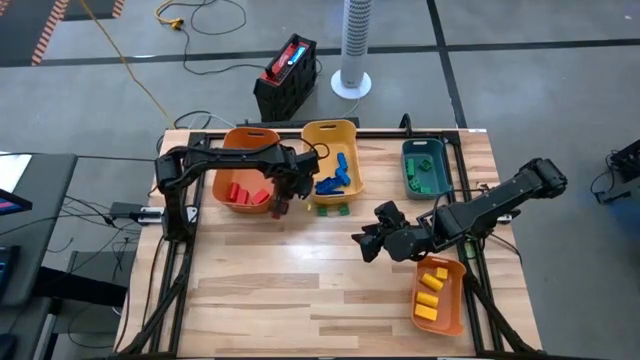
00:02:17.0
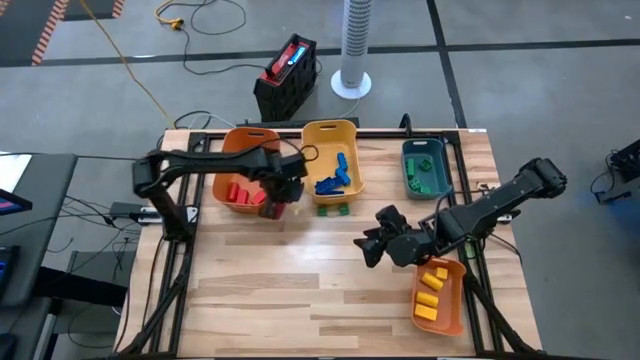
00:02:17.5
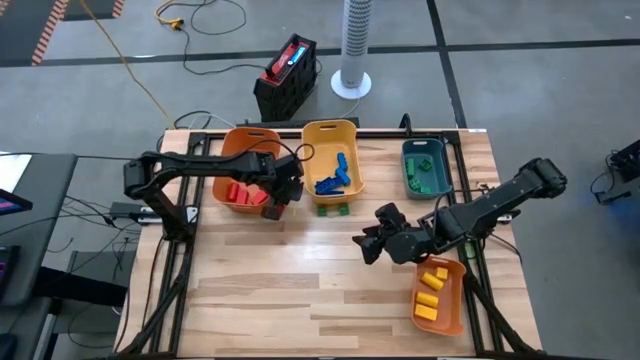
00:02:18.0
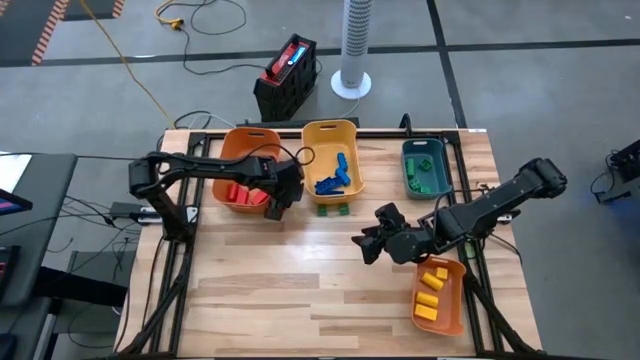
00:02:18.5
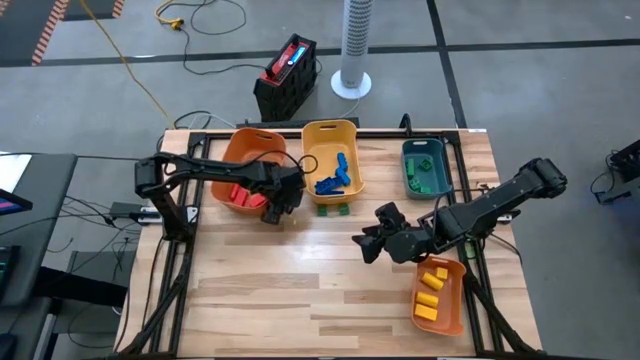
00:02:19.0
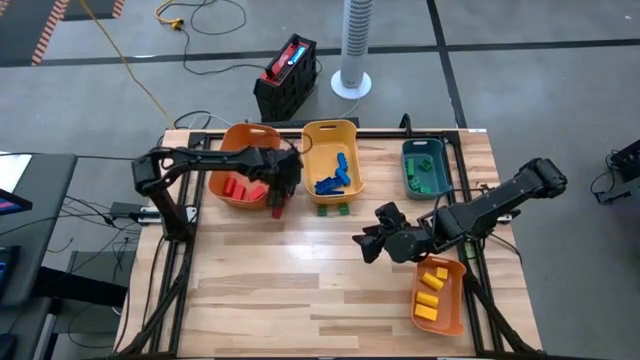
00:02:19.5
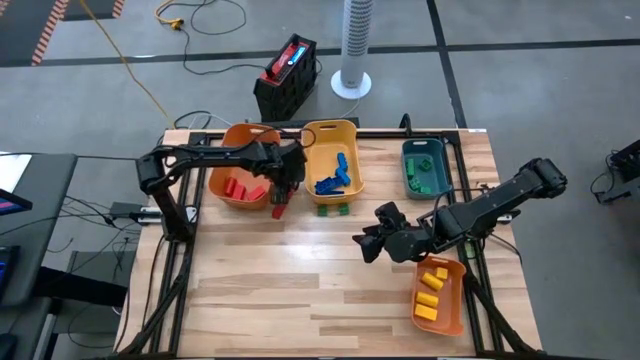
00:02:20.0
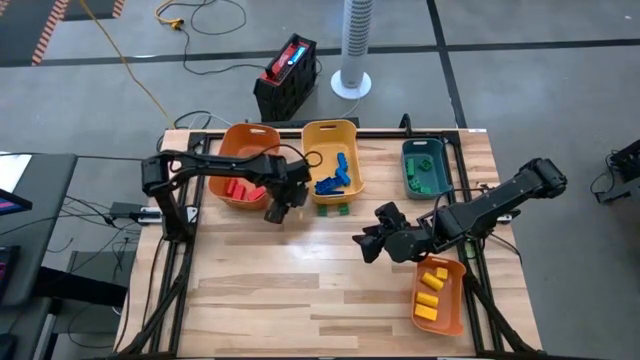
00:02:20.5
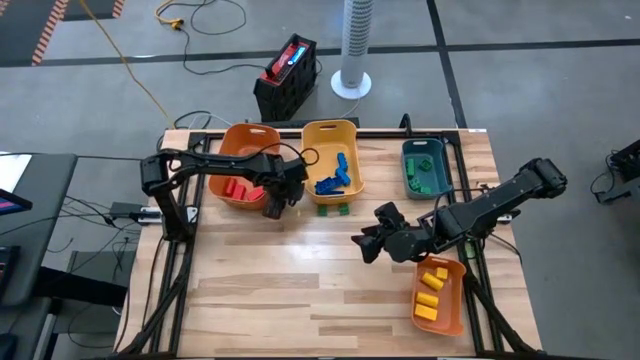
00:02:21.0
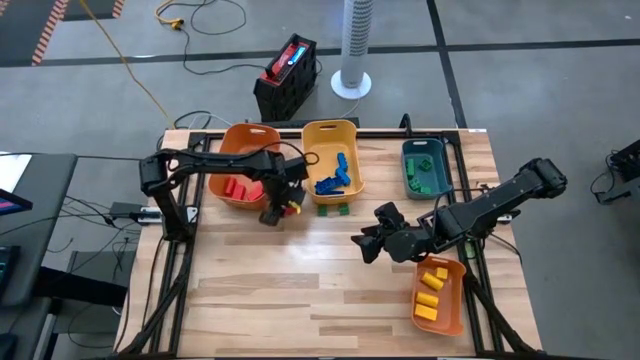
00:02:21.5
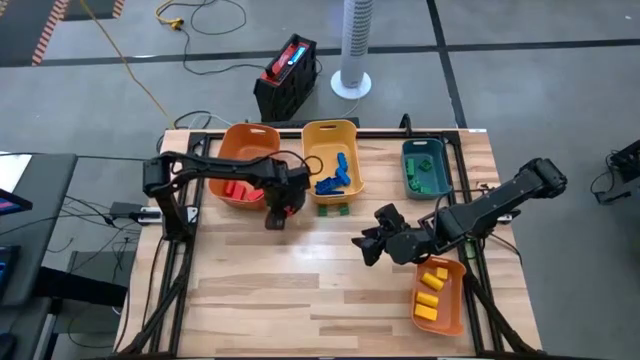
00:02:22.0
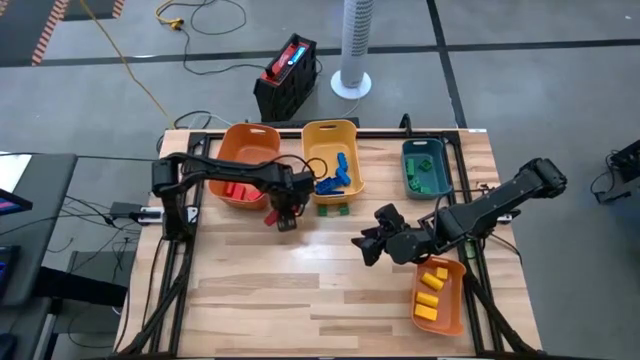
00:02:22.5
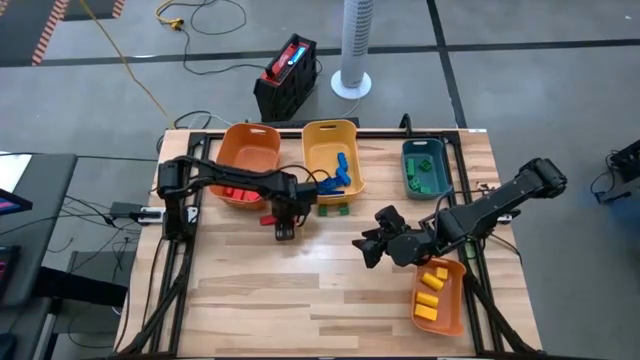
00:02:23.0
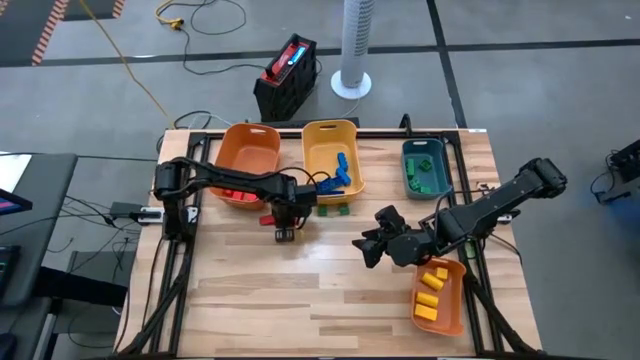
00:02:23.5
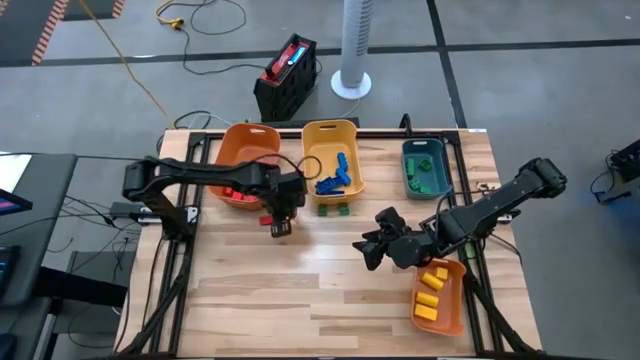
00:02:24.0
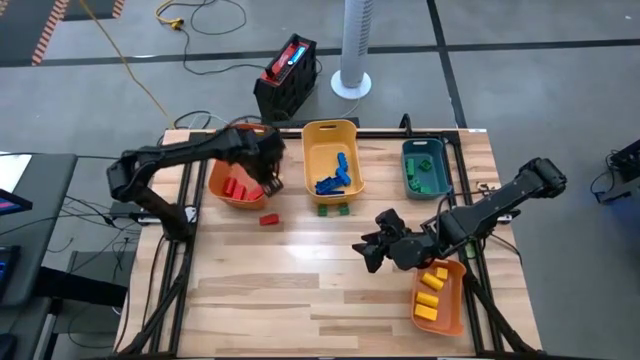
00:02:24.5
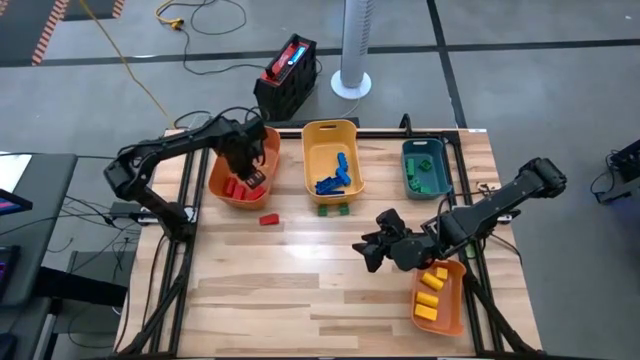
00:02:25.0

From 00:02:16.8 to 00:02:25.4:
Task: Sort blocks
Put the red block into the top orange bin

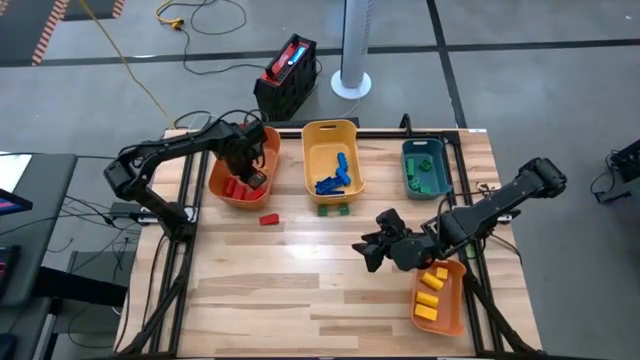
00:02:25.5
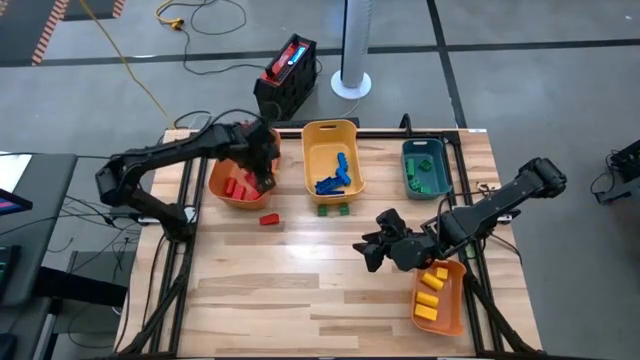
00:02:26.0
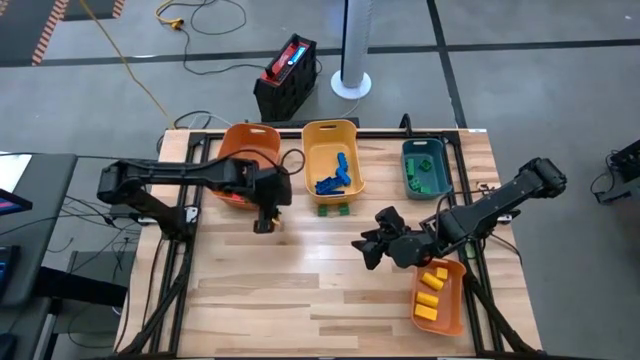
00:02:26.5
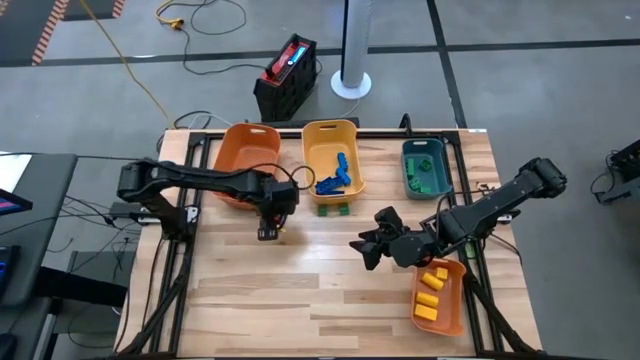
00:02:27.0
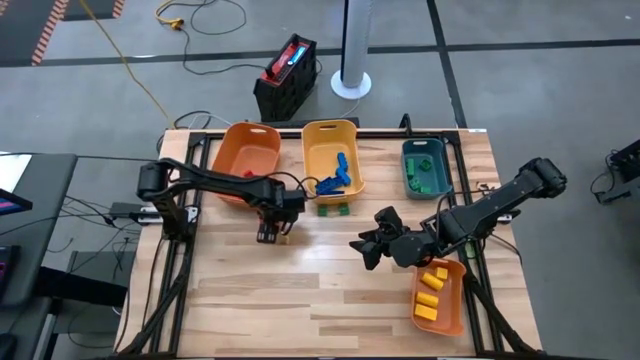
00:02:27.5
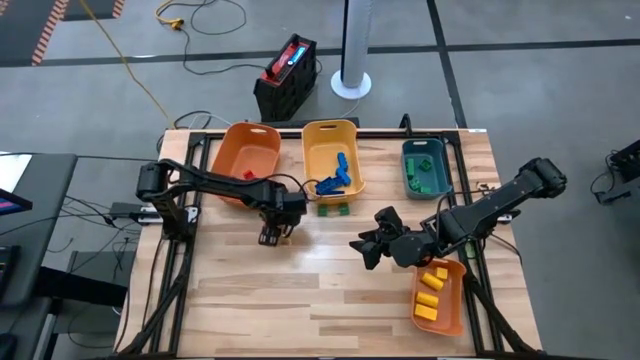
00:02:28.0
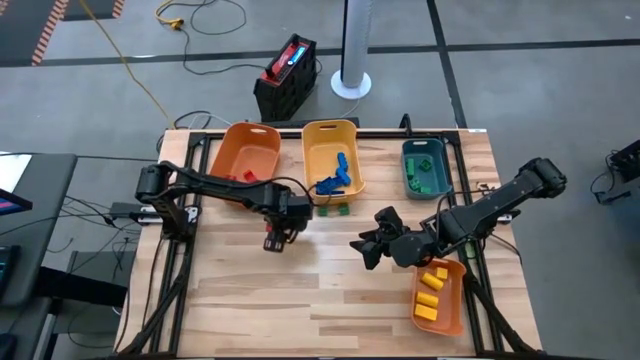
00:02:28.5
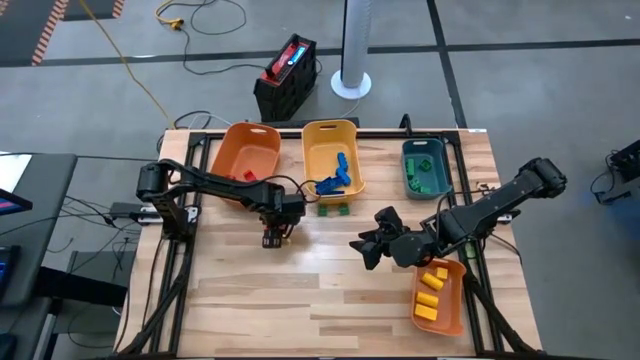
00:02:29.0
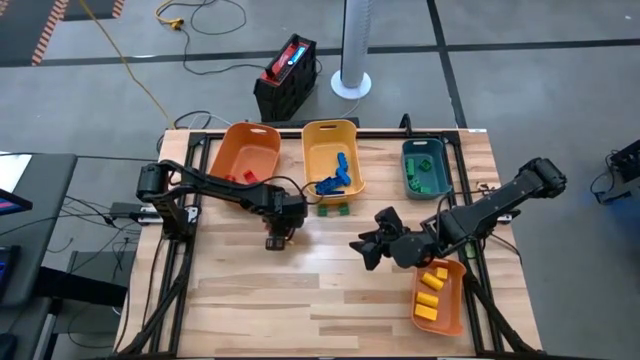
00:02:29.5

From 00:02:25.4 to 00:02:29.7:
Put the red block into the top orange bin

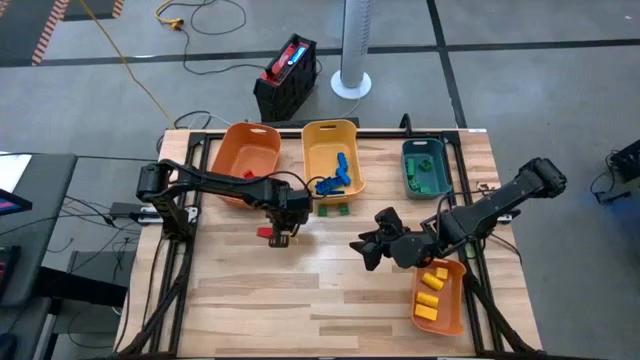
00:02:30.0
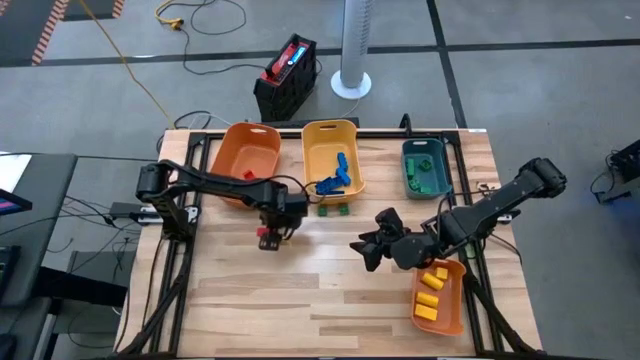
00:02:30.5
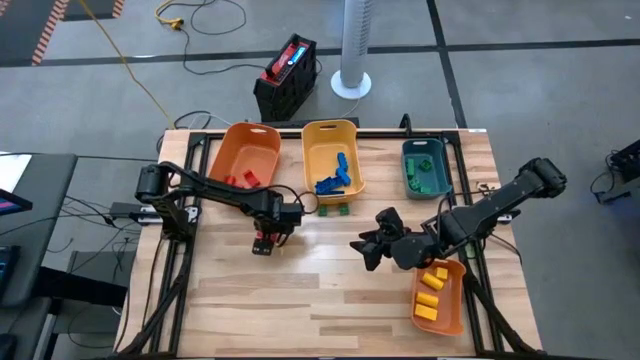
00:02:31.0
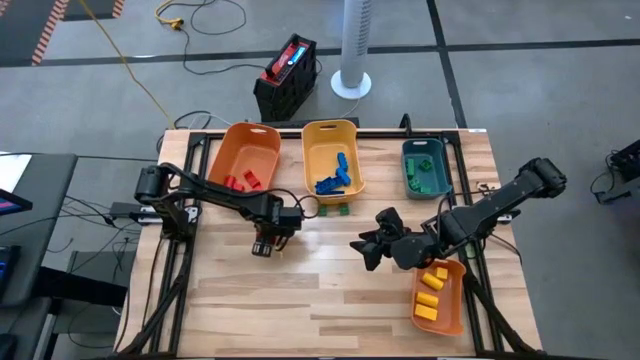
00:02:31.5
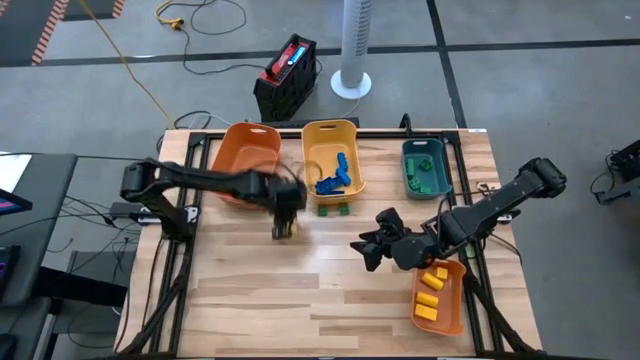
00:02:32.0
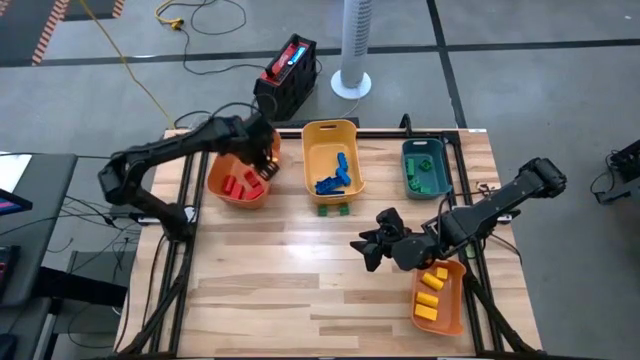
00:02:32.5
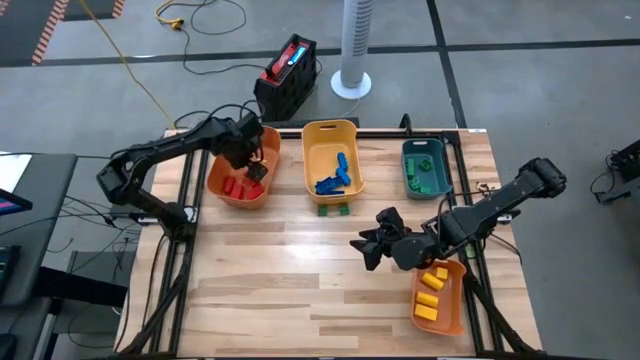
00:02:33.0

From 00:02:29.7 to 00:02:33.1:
Put the red block into the top orange bin

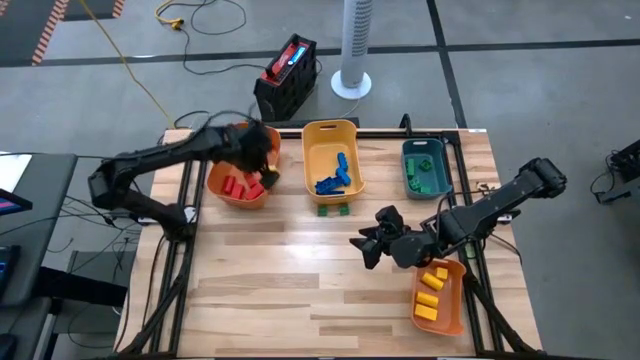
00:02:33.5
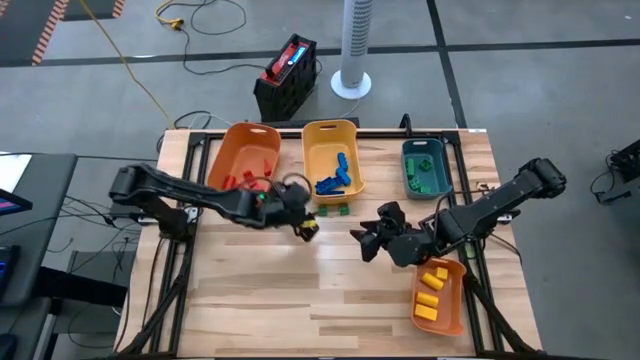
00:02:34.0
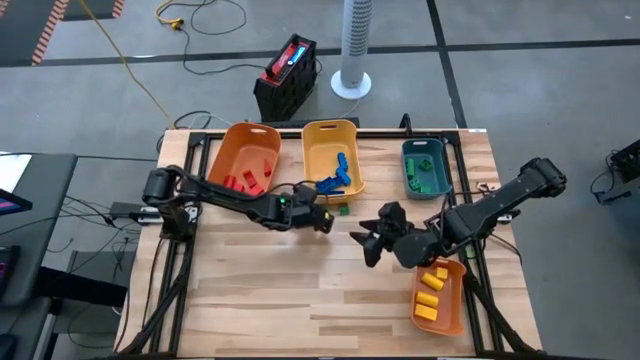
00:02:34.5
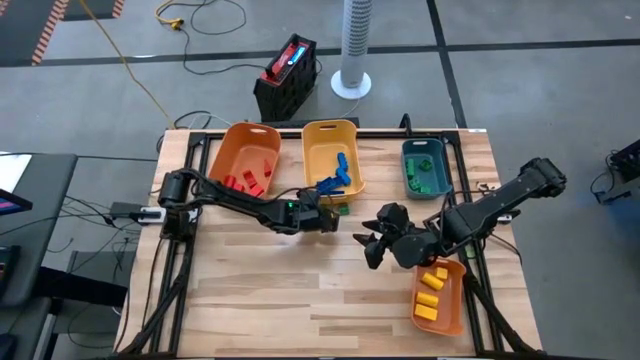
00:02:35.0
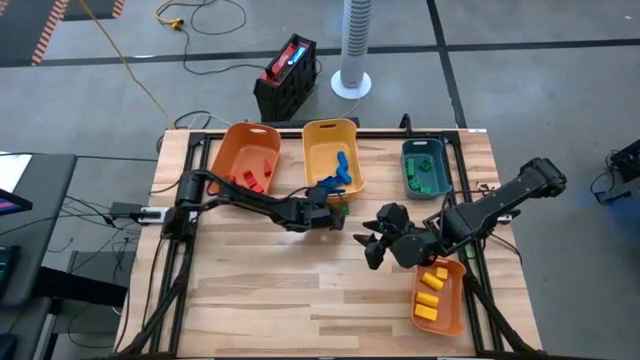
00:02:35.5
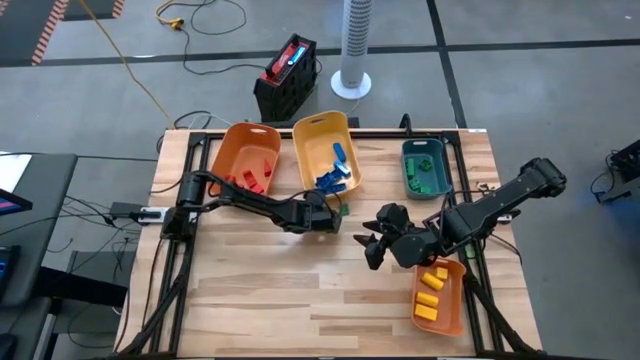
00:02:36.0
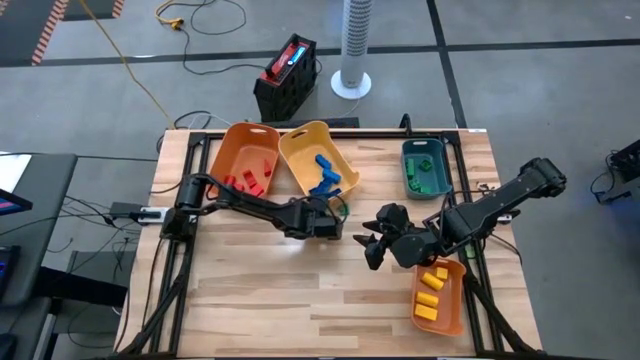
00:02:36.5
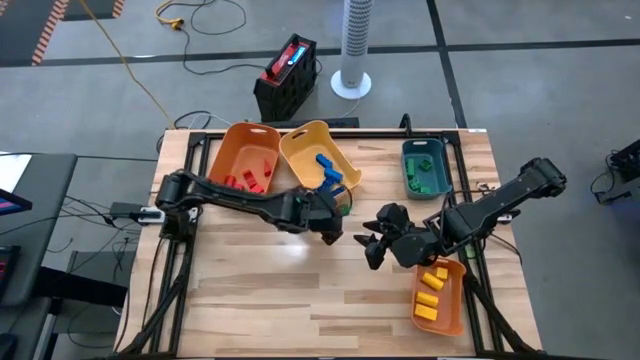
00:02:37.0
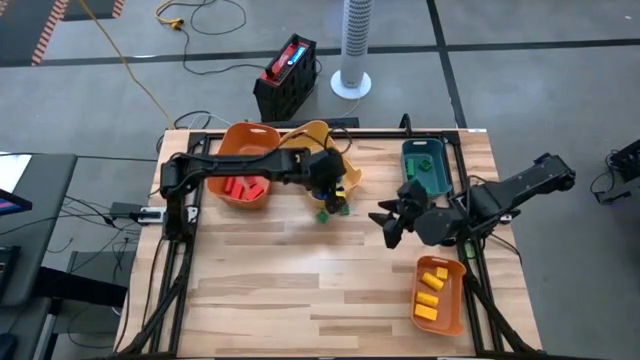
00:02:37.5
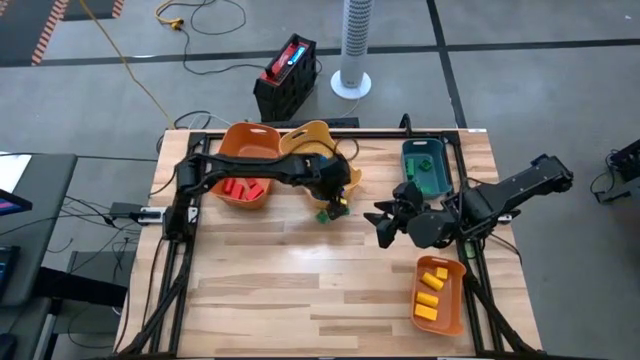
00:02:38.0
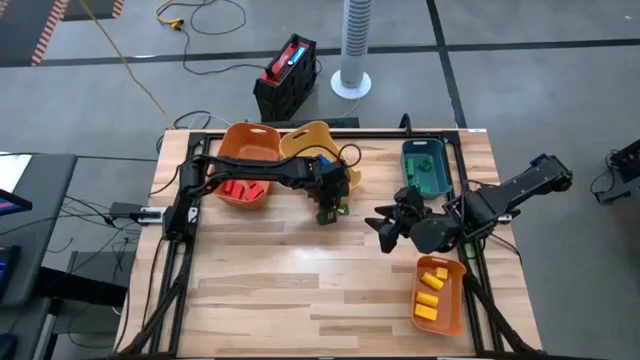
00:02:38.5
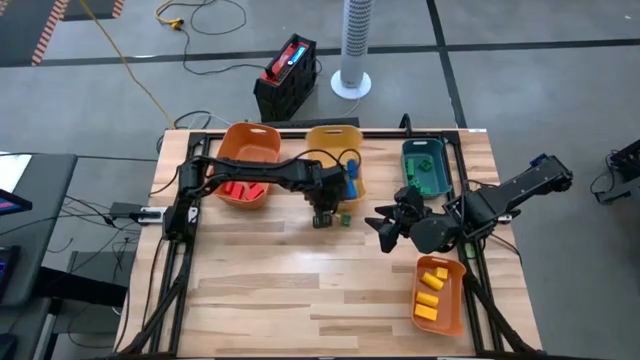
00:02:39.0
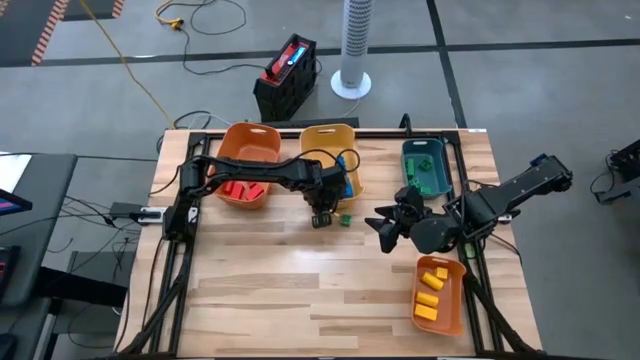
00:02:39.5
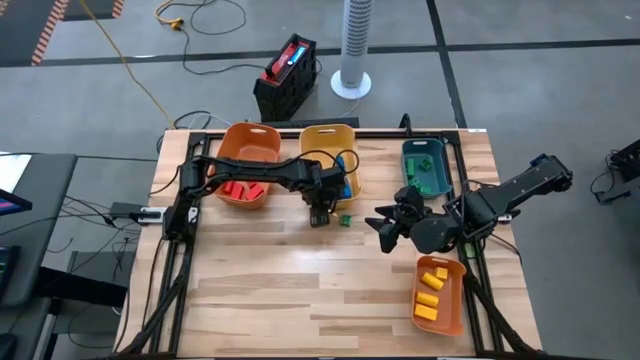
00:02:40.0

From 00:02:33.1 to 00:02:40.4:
Adjust the yellow bin
